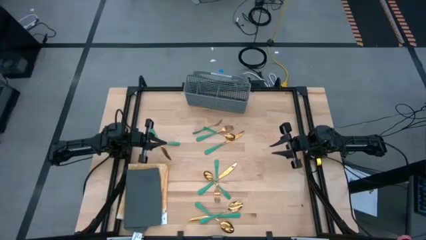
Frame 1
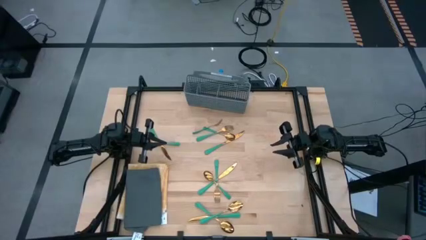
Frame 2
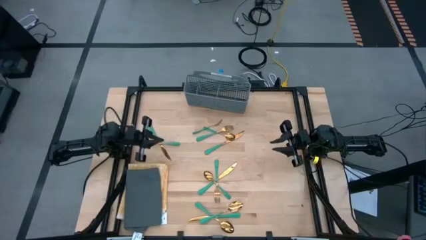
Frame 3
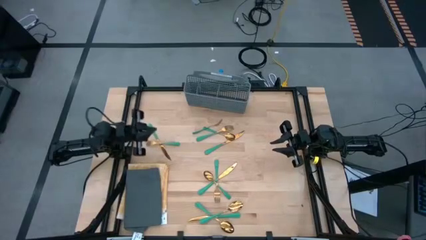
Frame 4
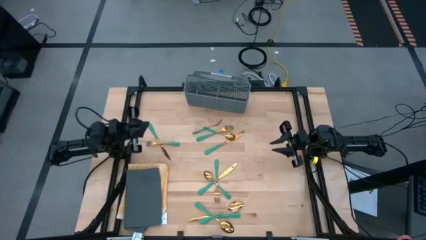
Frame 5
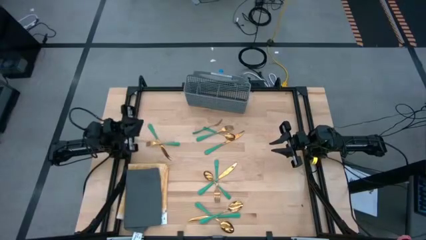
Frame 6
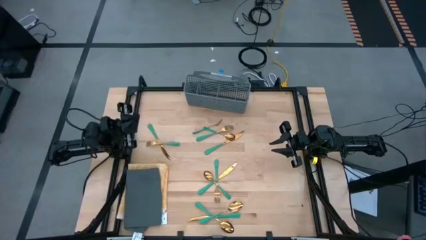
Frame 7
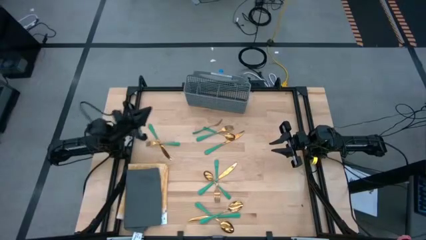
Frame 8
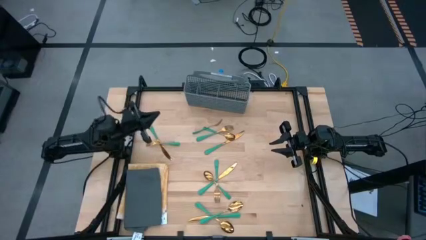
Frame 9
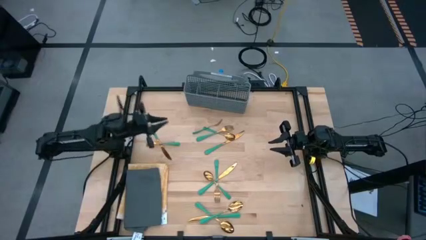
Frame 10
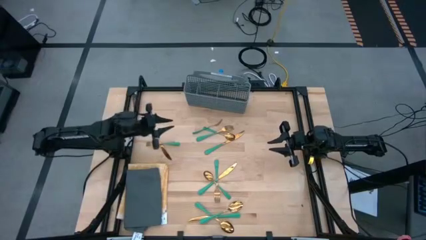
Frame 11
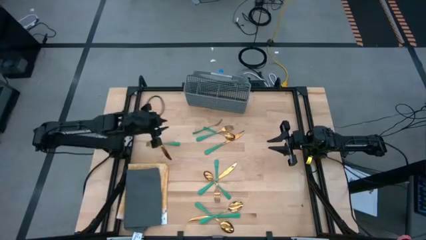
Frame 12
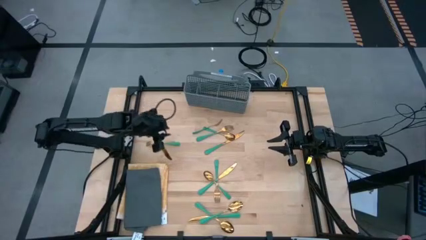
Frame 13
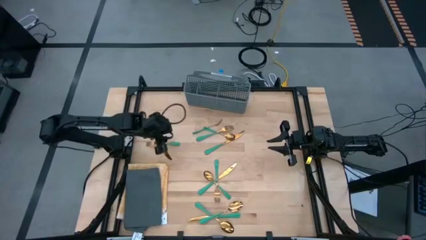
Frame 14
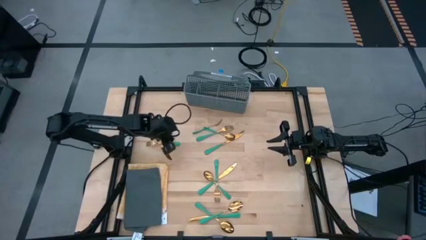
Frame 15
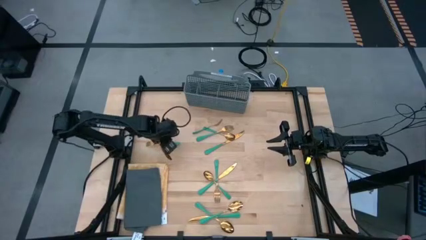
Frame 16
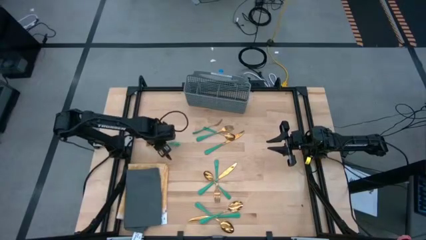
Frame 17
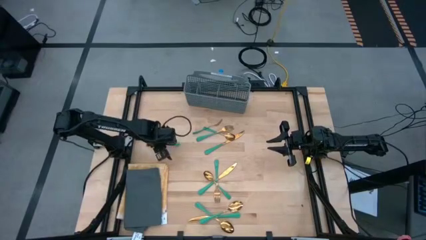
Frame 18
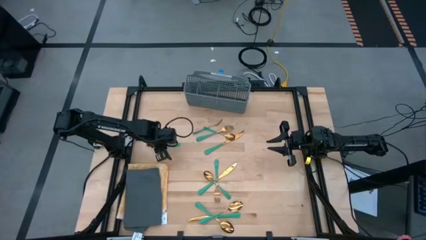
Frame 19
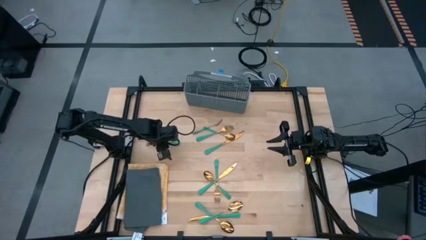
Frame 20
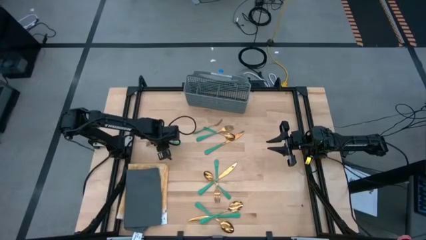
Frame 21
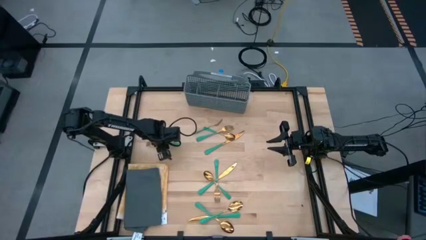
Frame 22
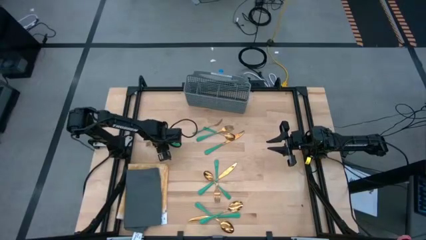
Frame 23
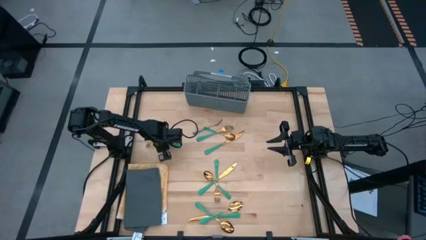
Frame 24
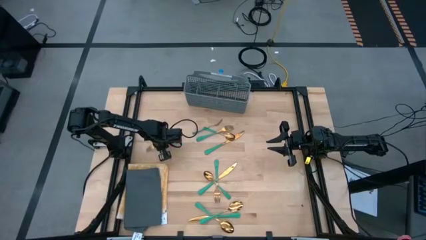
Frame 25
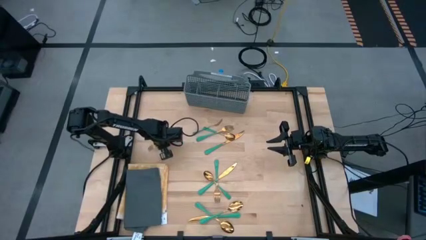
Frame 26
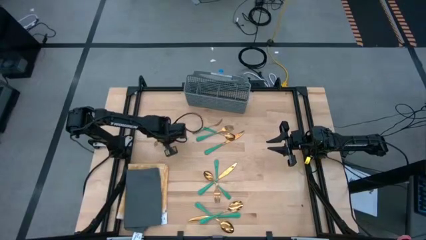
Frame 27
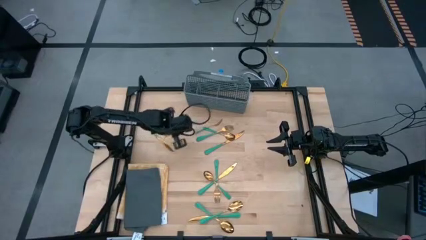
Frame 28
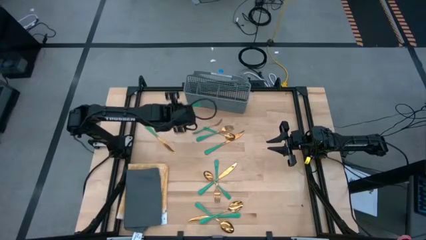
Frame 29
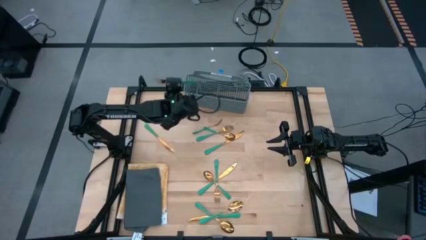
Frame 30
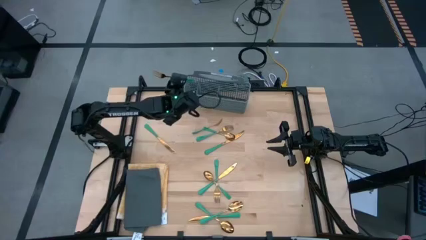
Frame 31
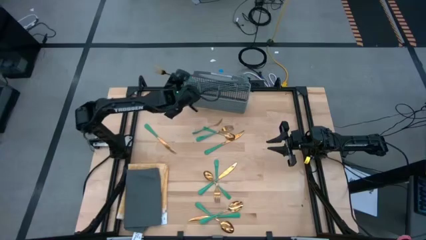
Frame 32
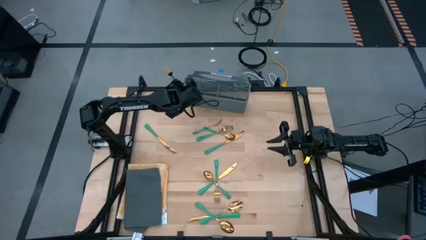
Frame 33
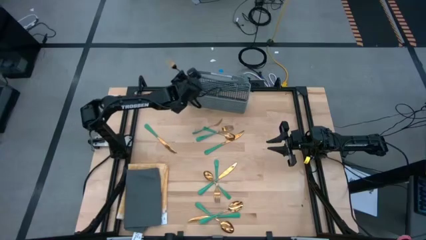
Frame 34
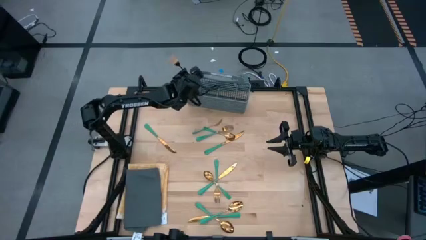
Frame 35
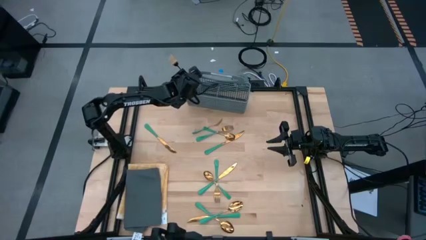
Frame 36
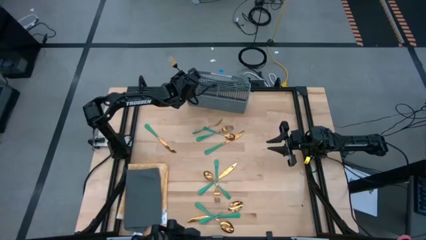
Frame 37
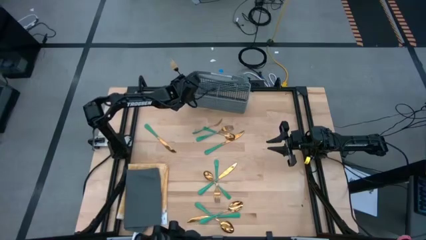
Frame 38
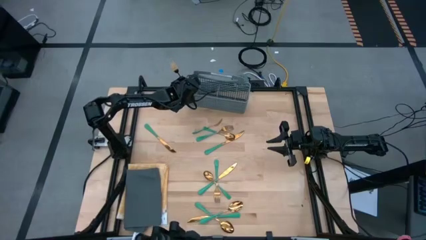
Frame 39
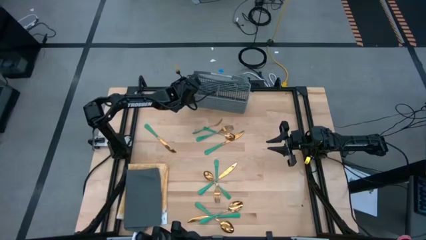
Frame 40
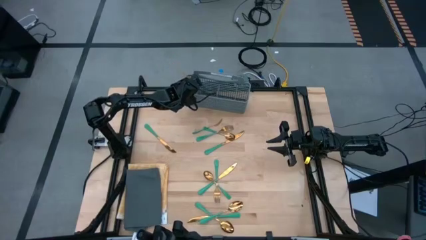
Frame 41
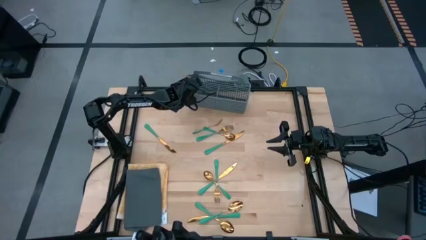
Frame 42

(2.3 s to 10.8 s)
Task: Sort silverware
Put the green fork into the gray silverware basket

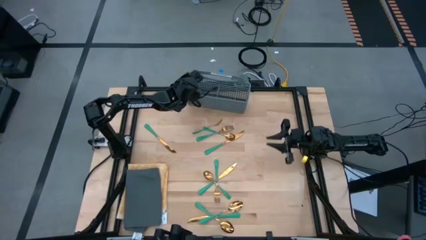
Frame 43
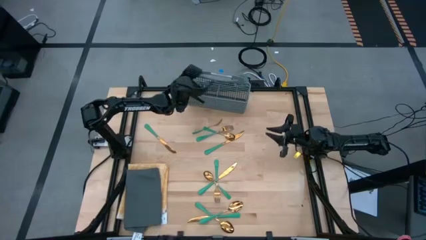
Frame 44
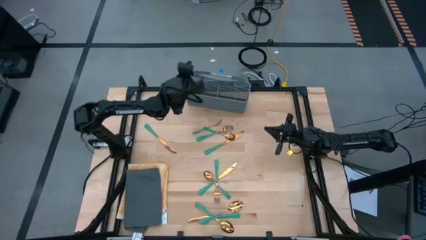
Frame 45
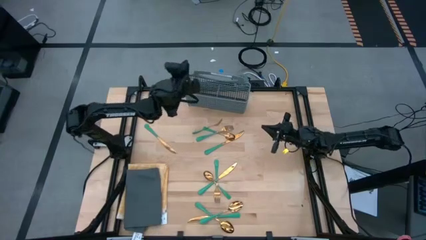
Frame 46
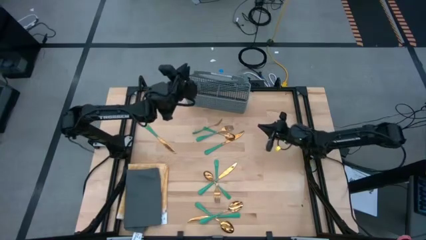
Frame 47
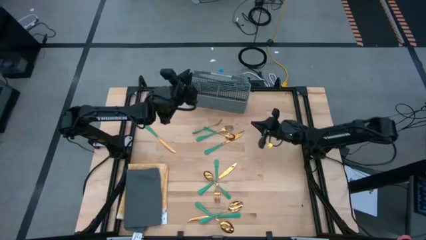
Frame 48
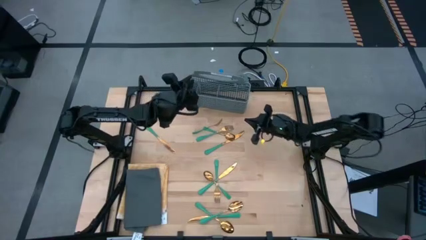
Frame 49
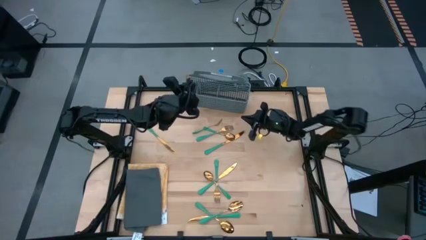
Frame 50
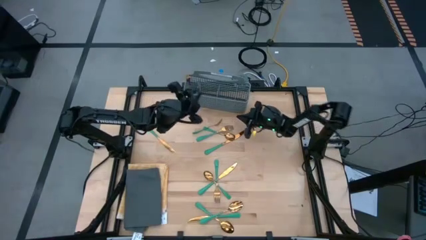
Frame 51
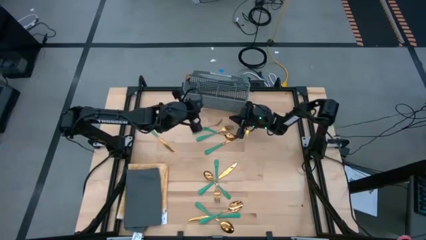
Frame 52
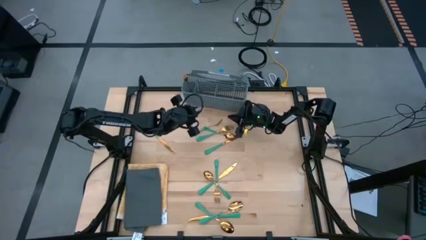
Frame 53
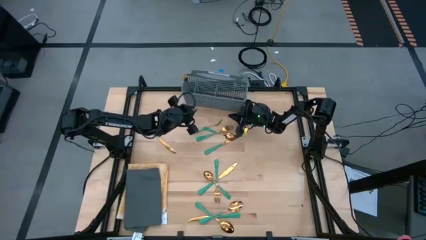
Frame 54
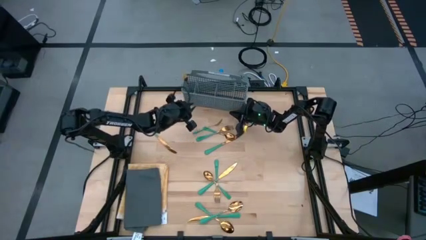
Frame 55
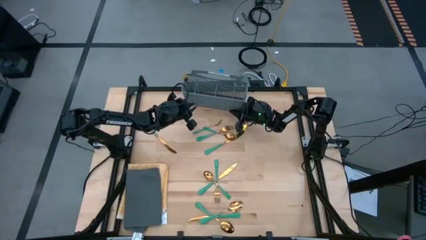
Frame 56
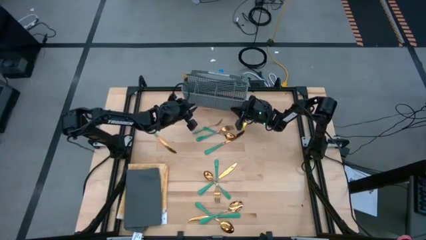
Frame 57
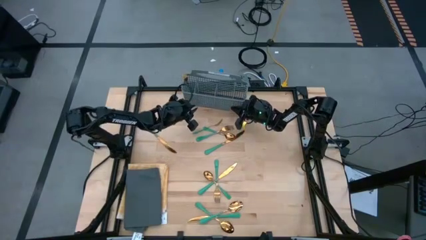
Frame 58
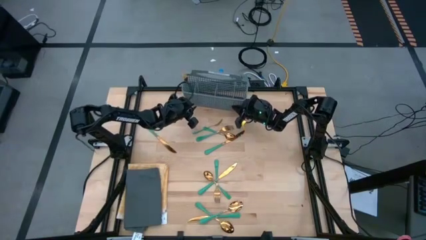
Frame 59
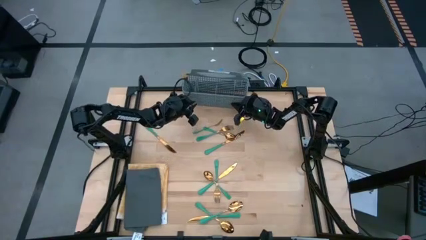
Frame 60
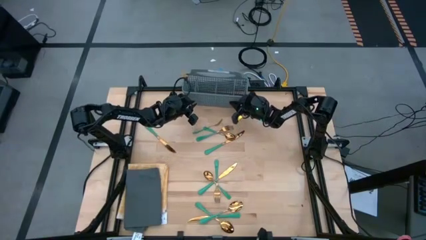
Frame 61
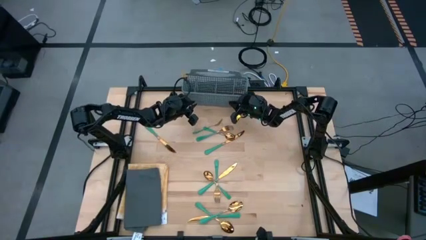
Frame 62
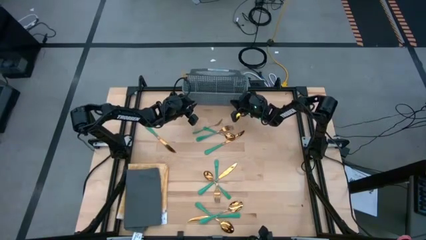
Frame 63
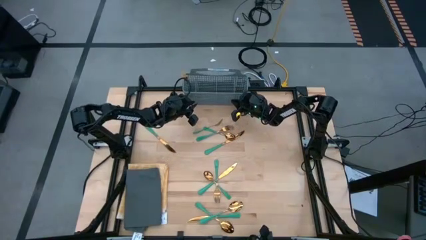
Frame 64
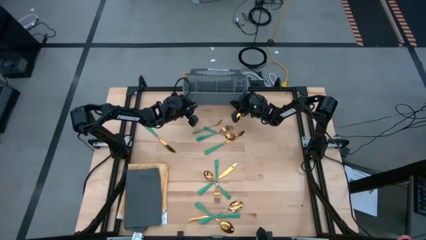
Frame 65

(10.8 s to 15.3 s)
Adjust the gray silverware basket

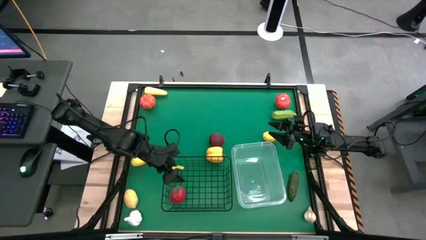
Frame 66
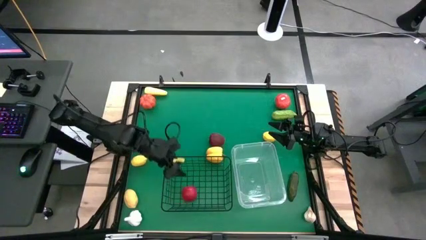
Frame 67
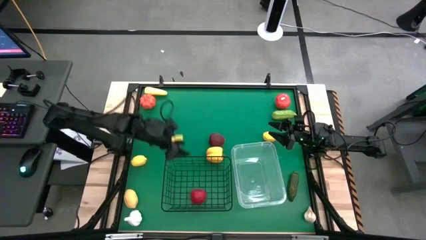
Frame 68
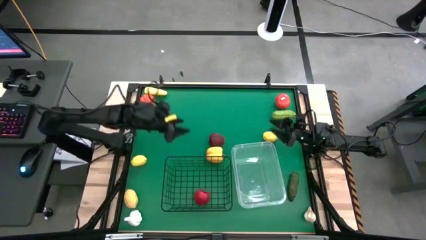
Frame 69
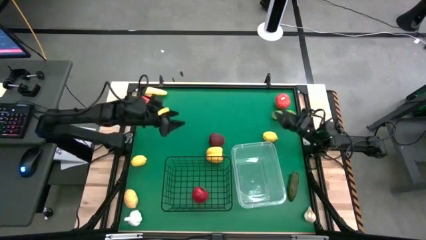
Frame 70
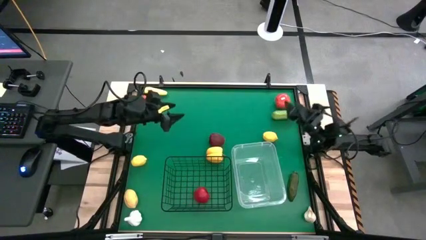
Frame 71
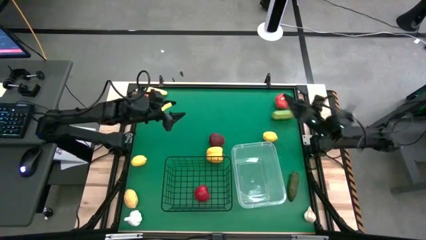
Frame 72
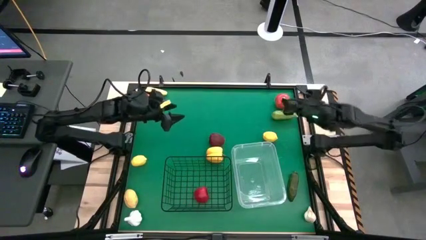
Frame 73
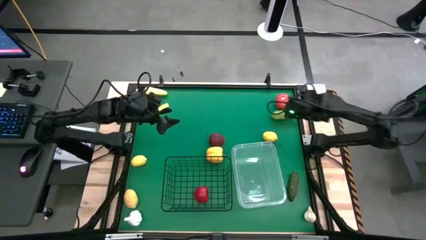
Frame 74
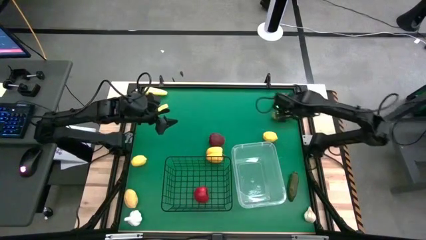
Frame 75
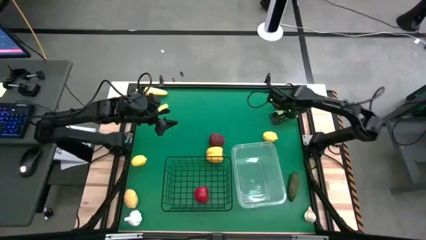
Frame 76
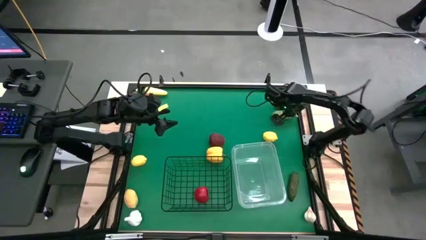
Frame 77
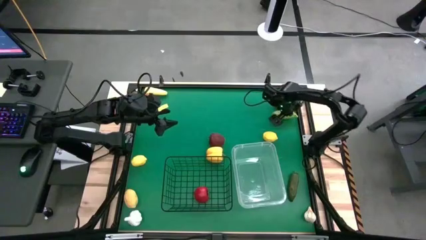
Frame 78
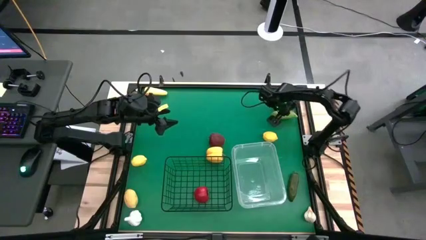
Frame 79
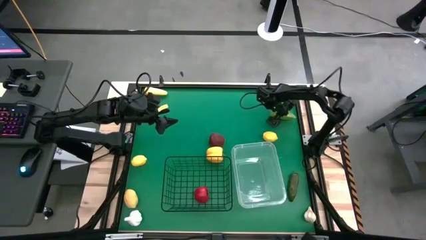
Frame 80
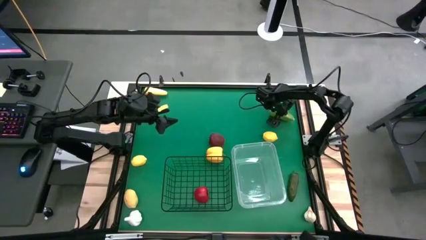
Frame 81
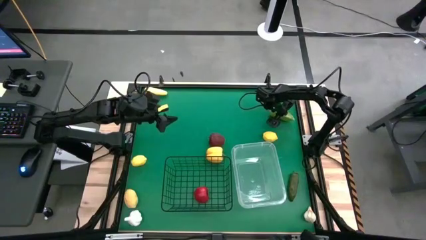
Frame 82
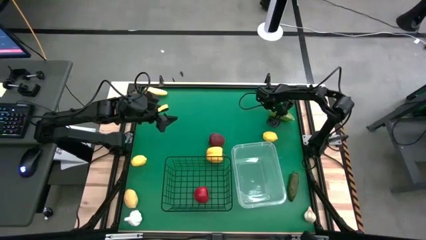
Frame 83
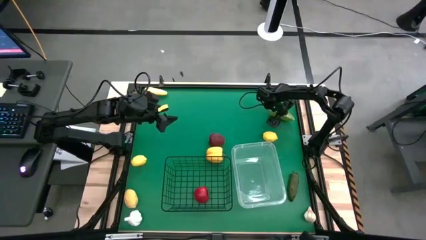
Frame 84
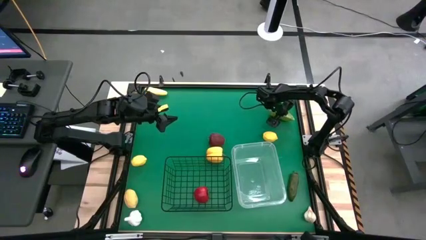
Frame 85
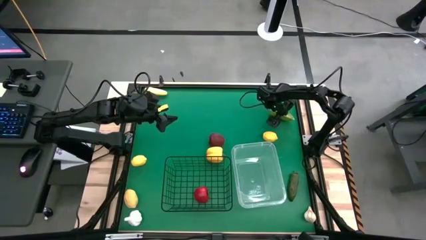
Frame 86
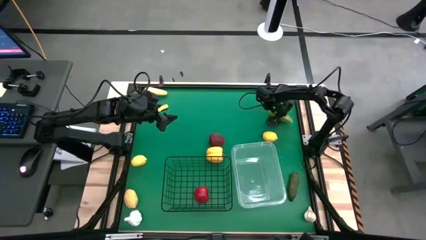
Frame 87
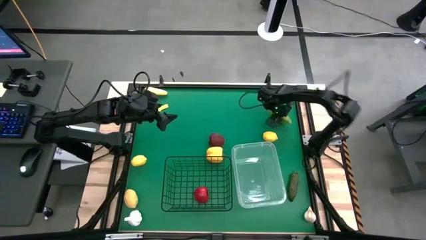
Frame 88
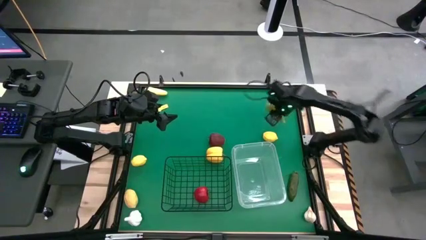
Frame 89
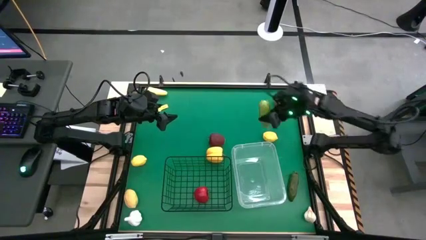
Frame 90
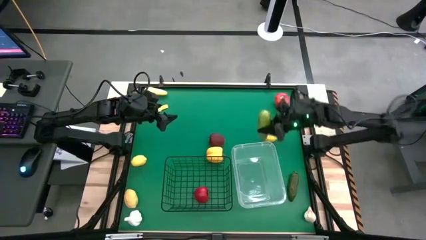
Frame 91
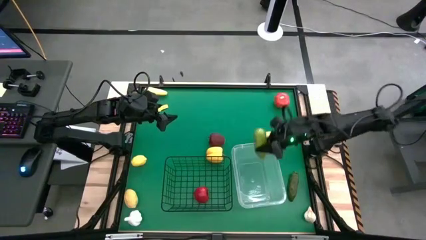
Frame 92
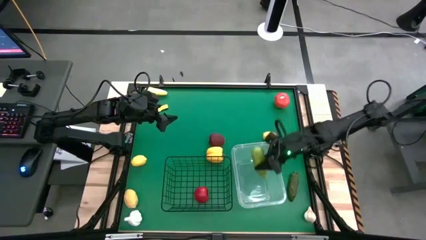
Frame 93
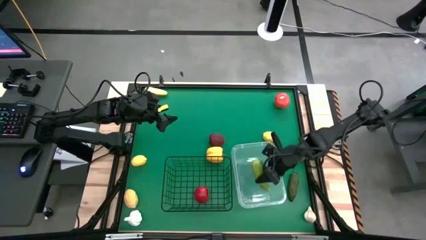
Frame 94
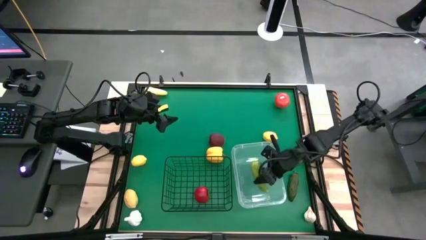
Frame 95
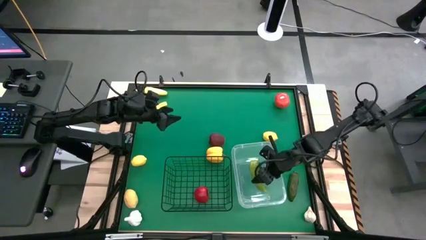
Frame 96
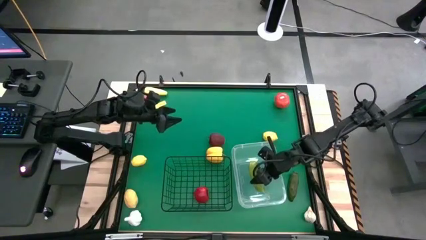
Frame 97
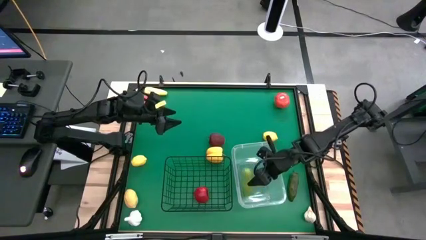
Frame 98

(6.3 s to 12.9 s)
Task: Sort produce into baskets
Put the cucumber into the transparent bin
